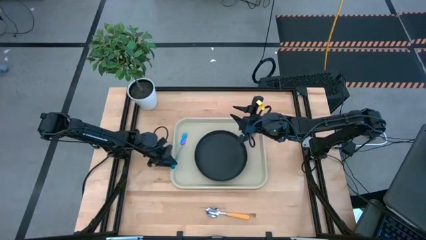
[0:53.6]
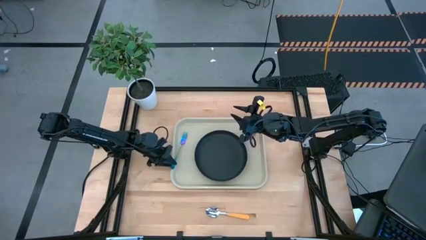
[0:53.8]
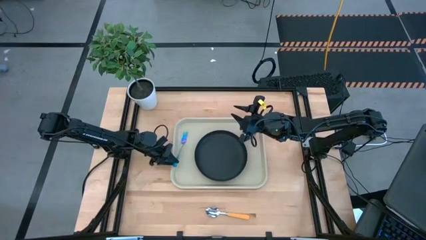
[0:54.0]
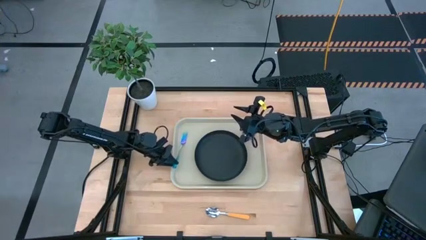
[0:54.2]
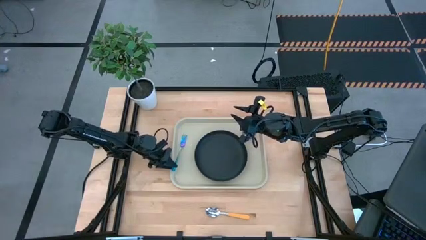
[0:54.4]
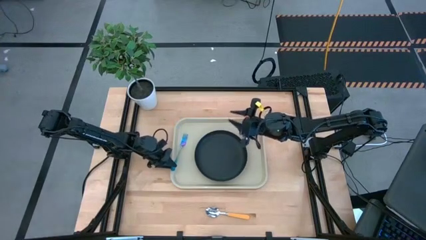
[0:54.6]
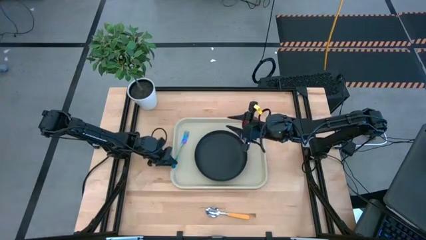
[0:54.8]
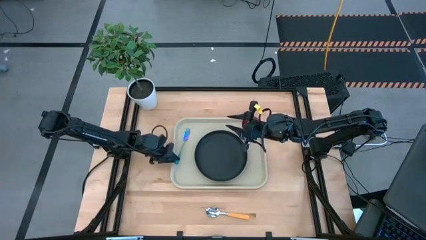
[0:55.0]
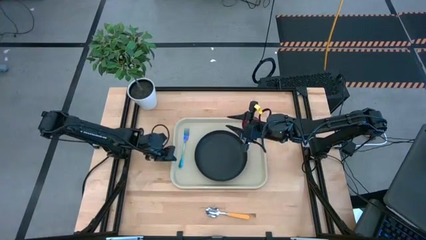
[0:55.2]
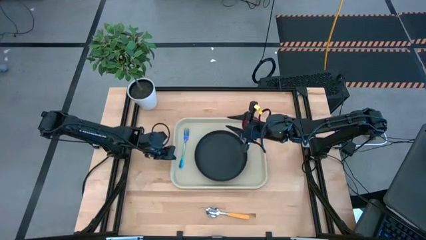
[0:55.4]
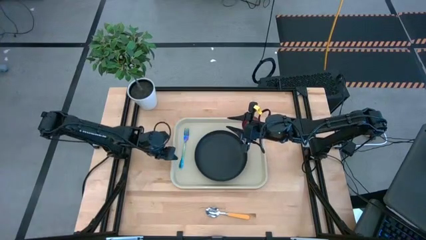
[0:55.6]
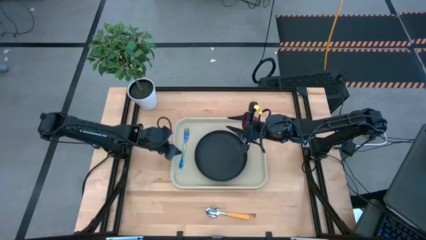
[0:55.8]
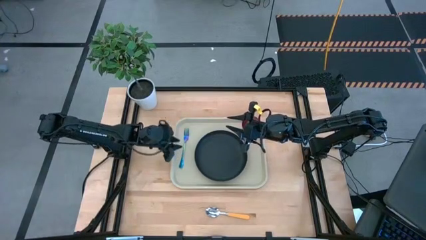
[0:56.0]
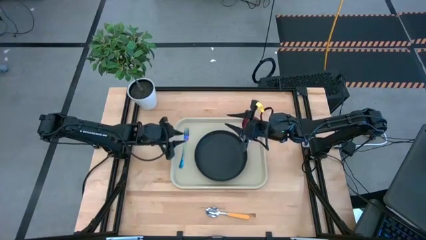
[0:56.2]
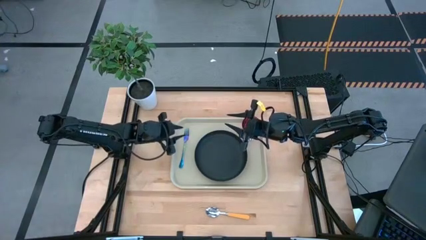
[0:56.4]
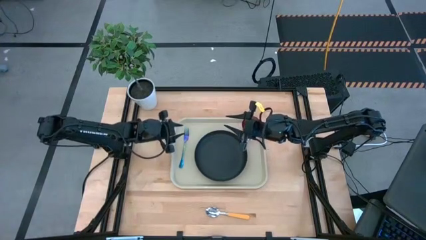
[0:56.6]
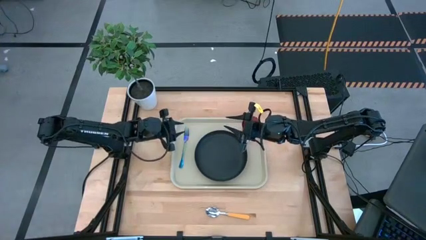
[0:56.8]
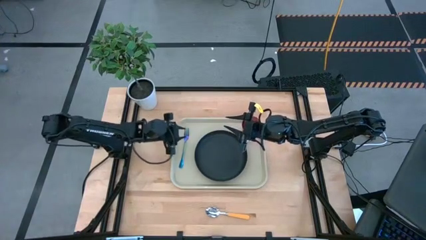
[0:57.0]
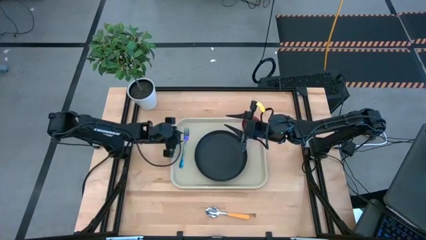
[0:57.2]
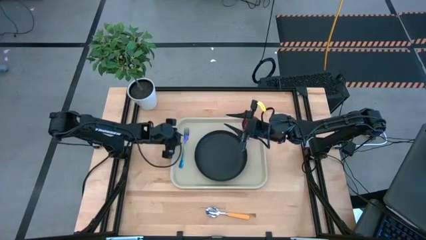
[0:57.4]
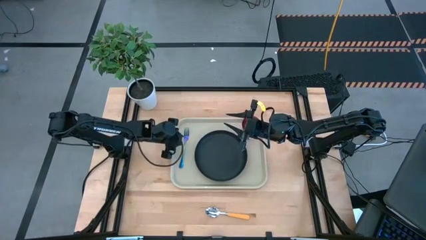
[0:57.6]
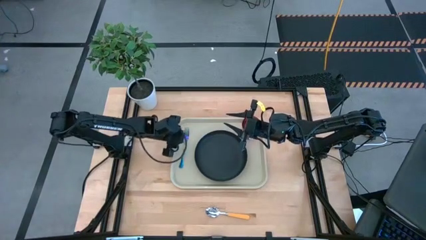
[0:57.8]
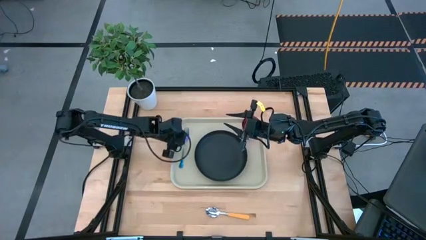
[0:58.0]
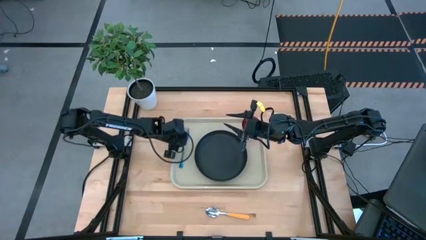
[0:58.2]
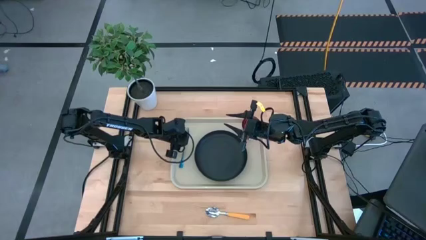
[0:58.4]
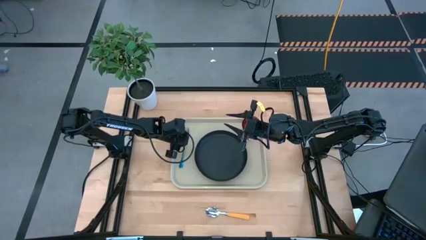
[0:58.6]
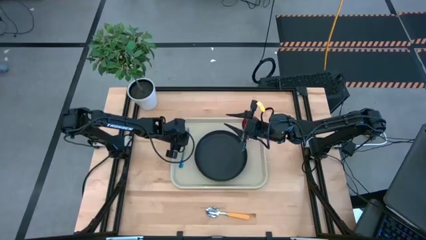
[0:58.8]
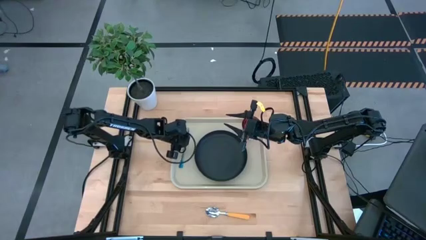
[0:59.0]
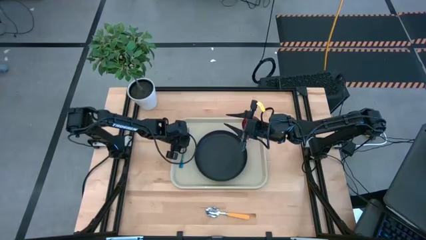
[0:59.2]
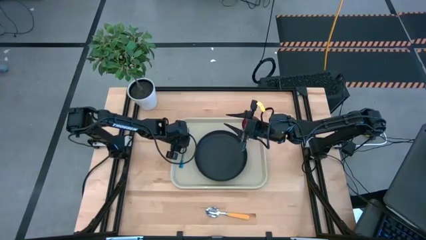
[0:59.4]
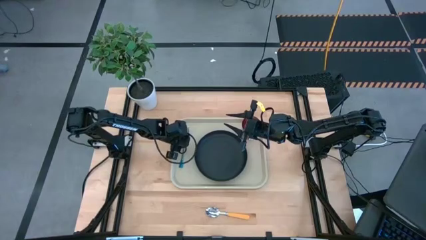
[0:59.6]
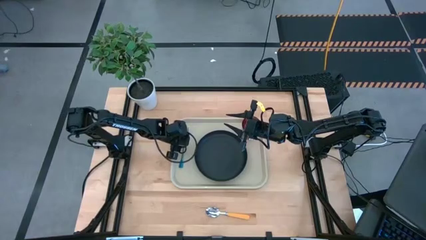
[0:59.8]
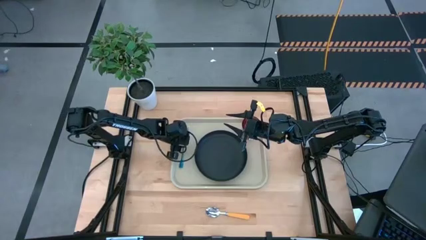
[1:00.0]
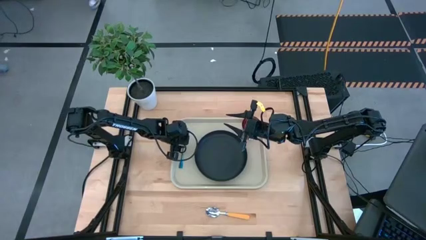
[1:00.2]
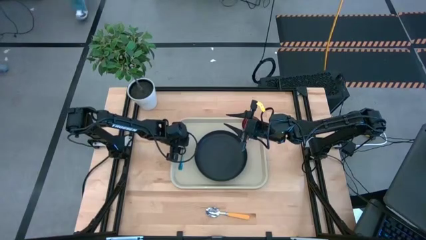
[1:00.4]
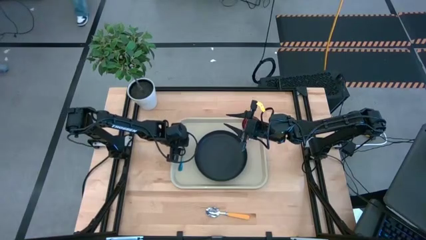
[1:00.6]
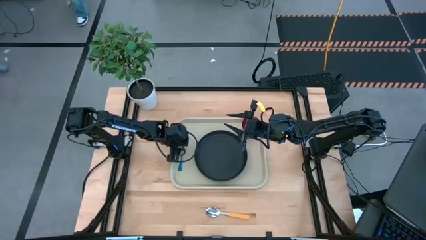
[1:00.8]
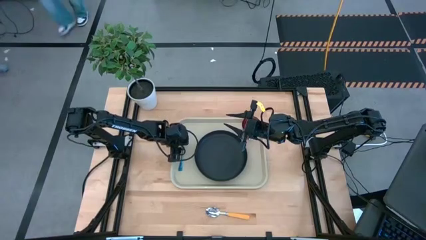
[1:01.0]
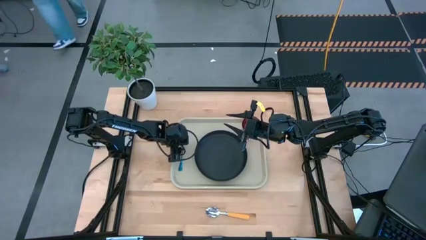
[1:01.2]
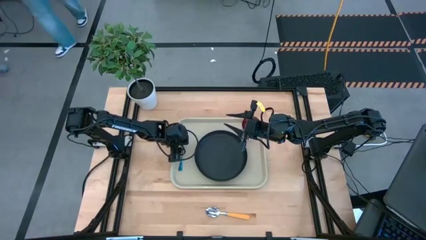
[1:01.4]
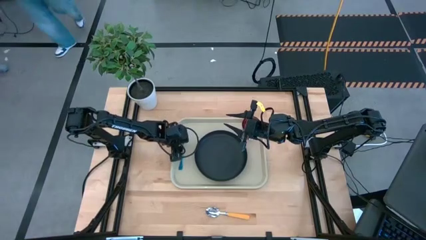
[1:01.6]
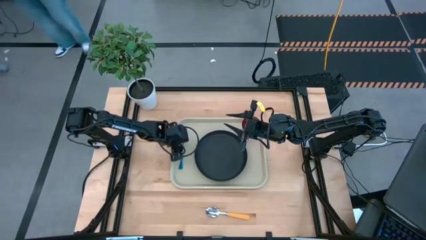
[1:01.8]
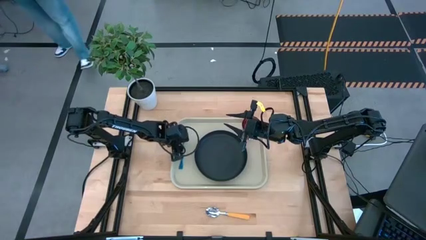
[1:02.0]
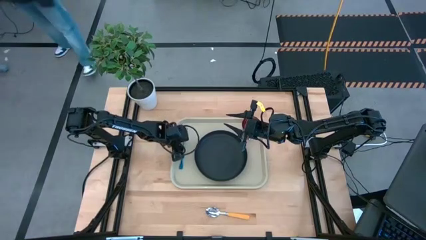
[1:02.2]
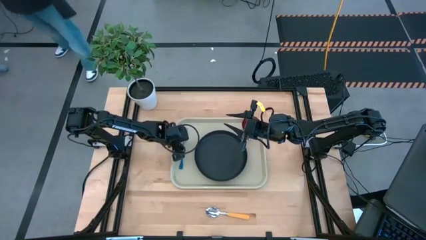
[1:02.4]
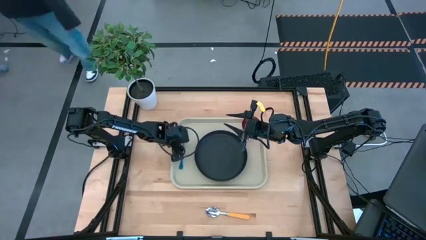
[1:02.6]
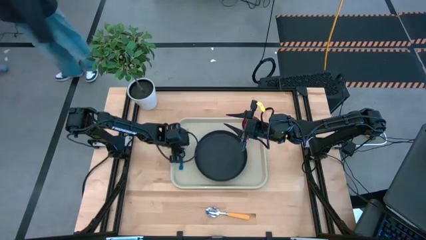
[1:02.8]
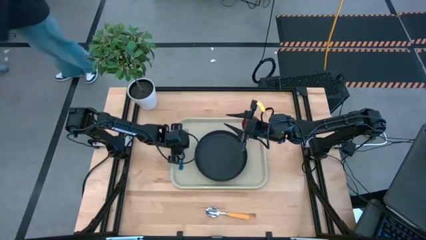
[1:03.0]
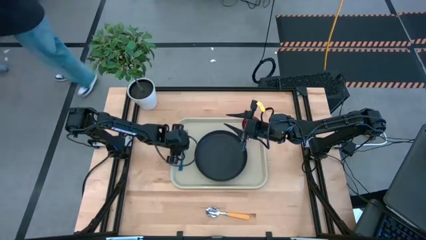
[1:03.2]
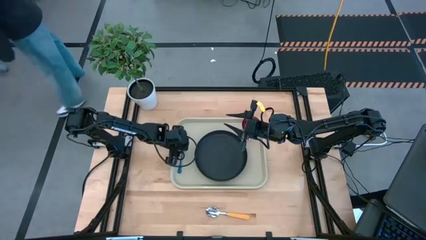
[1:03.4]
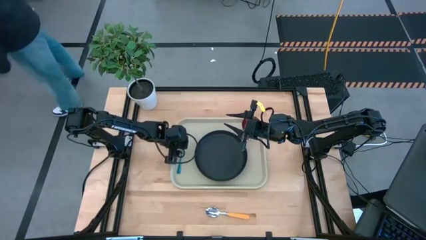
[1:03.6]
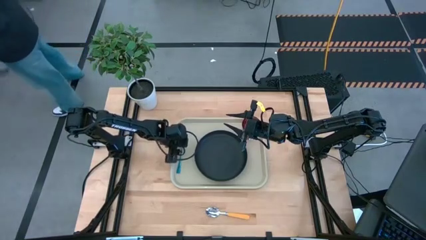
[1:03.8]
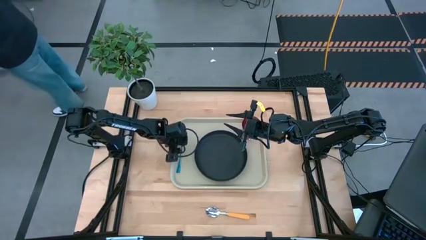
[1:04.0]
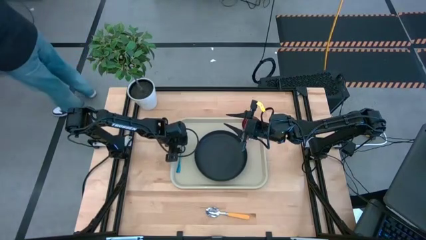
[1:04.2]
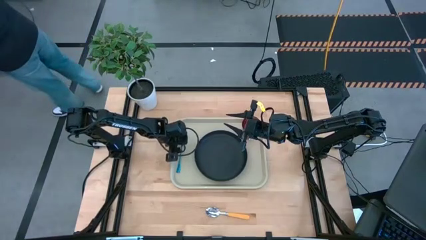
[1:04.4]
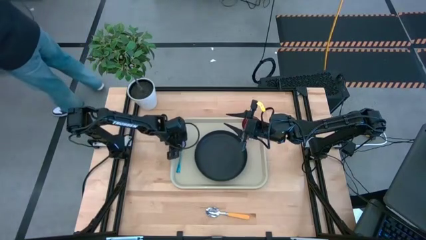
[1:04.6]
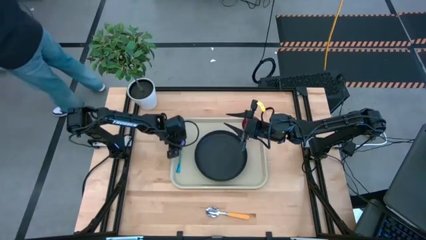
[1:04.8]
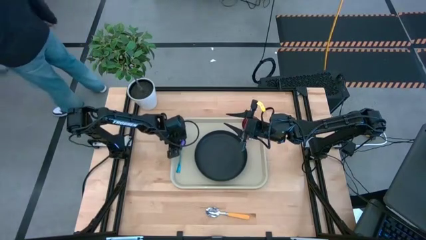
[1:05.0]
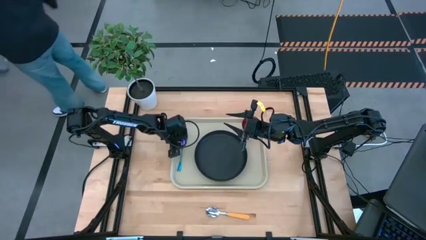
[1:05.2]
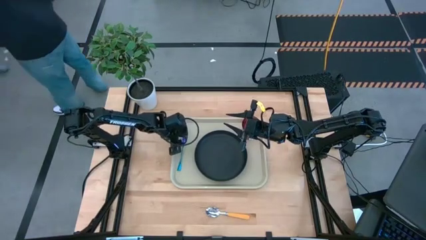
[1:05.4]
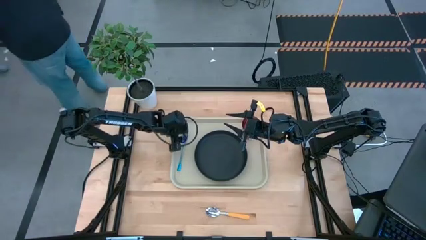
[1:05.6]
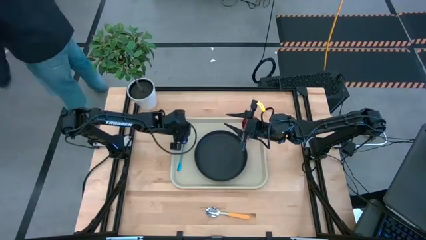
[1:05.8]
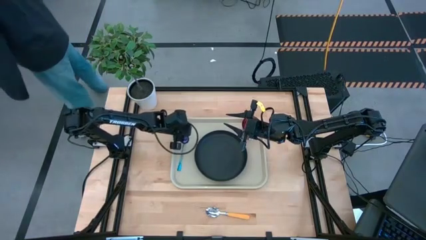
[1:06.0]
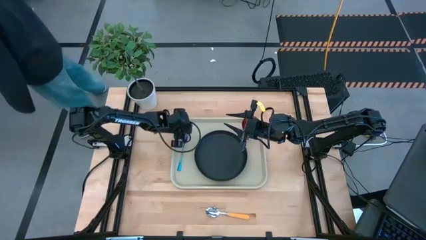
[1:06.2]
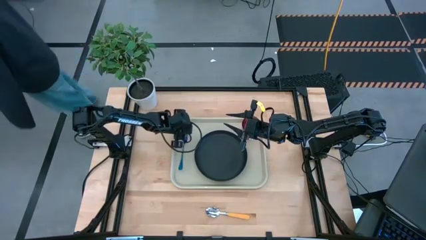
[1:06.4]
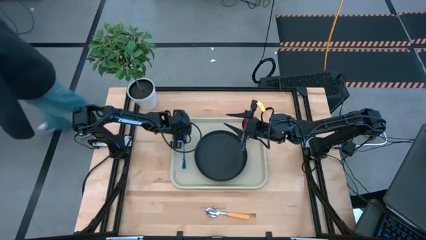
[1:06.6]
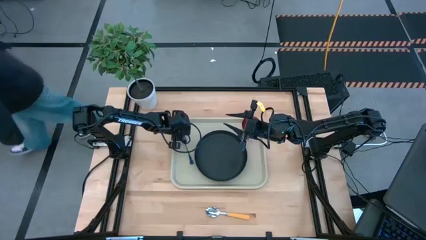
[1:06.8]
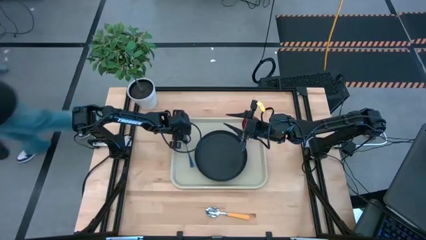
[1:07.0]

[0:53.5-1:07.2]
Task: Pick and place plate/cup/fork/spoon on tray
Put the blue fork on the gray tray to the left of the black plate

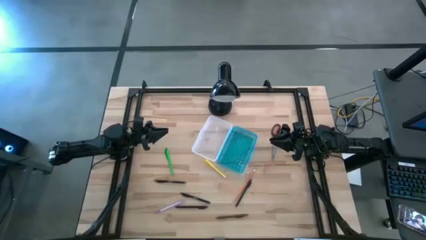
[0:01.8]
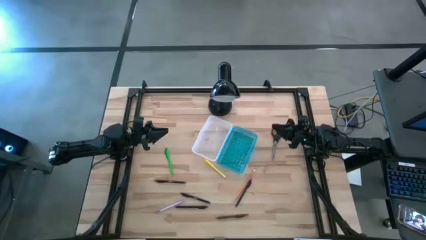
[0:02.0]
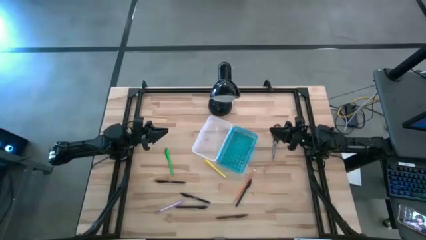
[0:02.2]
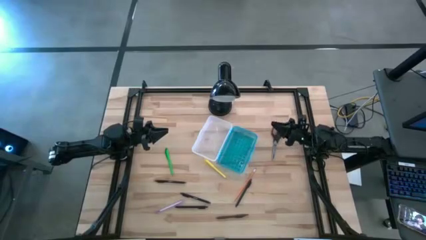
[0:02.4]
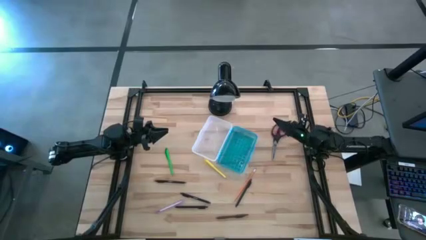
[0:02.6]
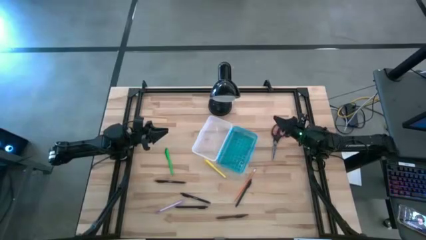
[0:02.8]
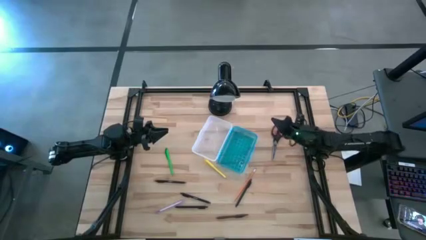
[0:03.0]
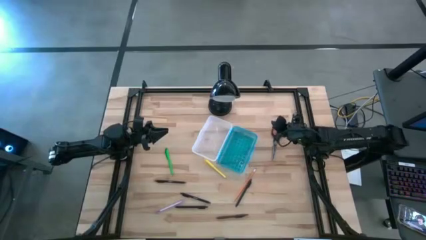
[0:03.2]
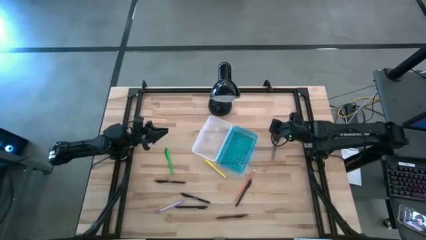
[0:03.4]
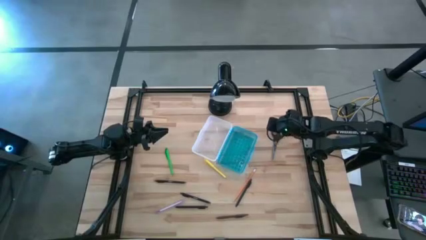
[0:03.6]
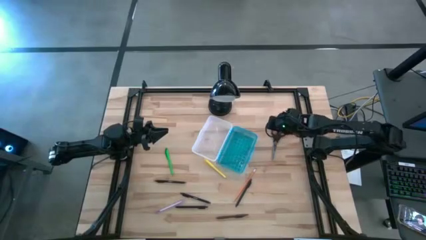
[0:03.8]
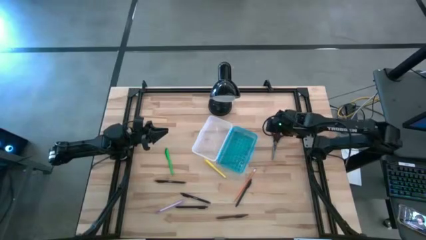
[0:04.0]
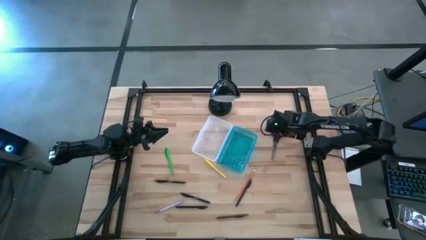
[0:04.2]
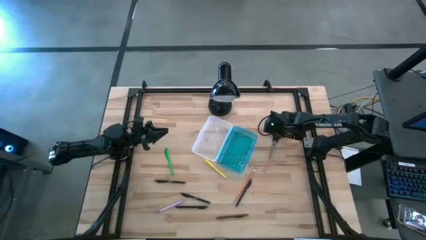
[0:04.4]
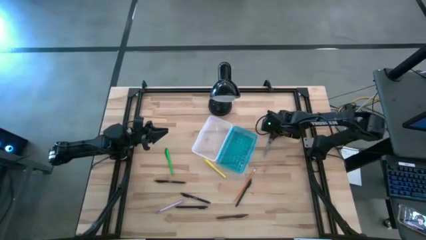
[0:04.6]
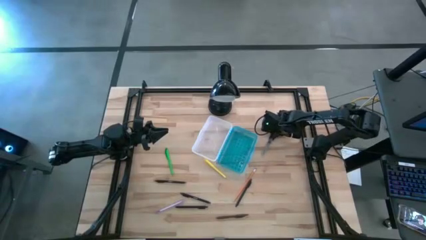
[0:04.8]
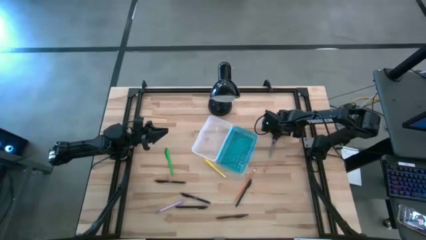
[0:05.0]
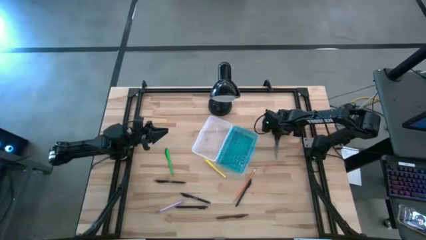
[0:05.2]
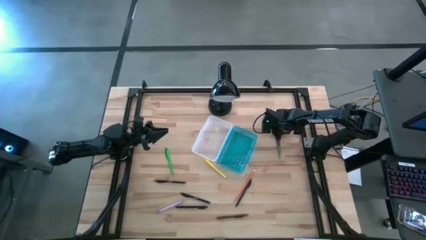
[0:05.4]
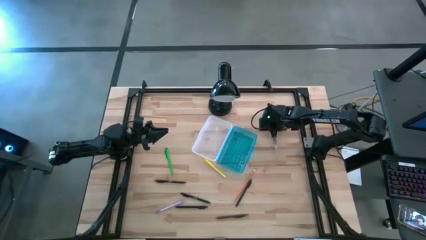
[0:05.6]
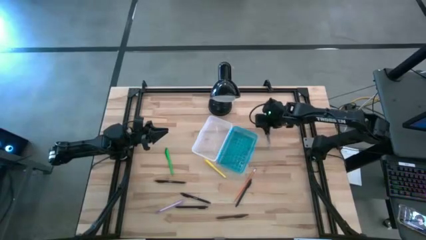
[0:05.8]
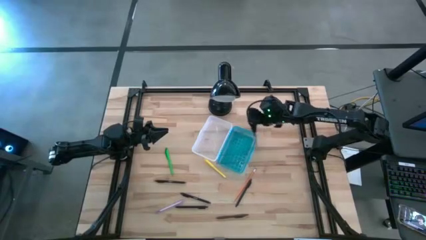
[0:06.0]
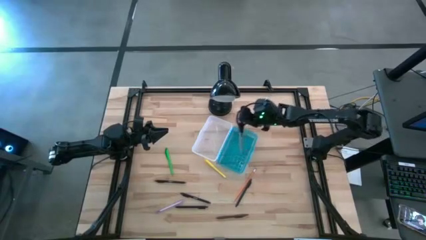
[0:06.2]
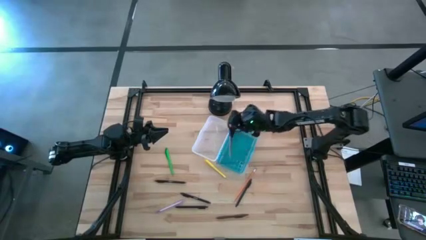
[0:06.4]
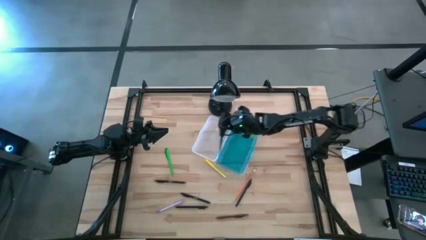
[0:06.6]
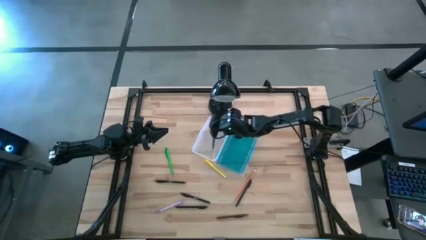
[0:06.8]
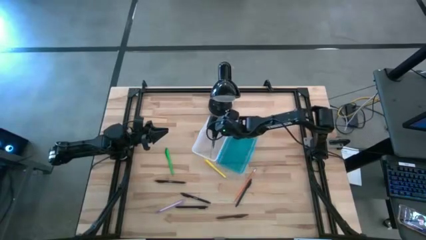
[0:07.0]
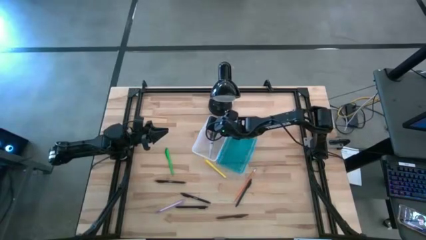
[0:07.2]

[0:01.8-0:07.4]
Task: Pick & place school supplies into a supply box
Put the black scissors into the supply box
